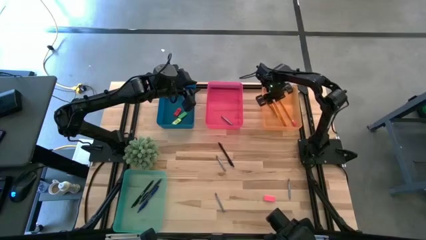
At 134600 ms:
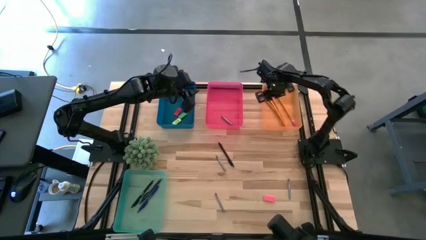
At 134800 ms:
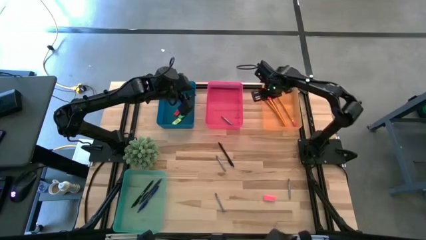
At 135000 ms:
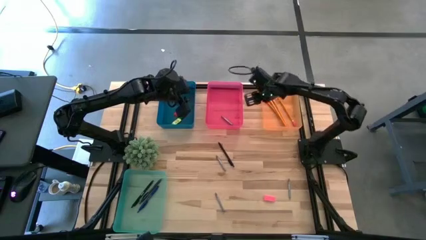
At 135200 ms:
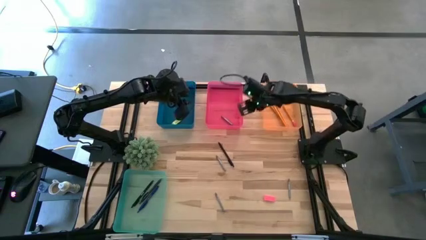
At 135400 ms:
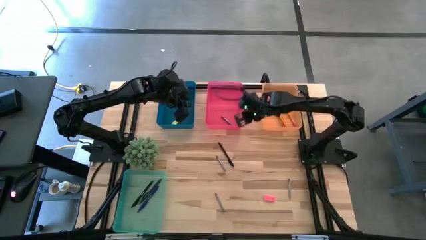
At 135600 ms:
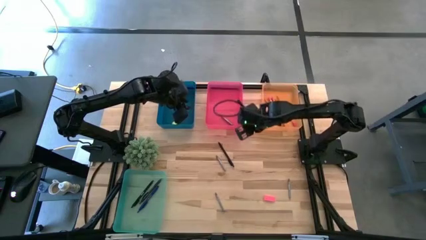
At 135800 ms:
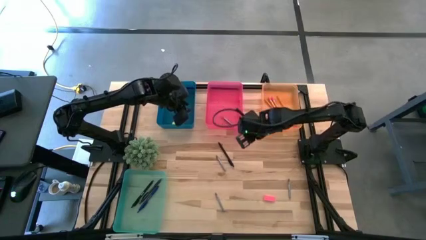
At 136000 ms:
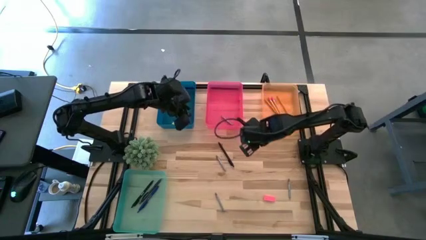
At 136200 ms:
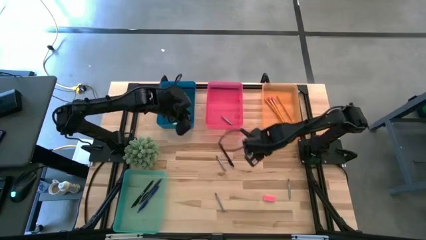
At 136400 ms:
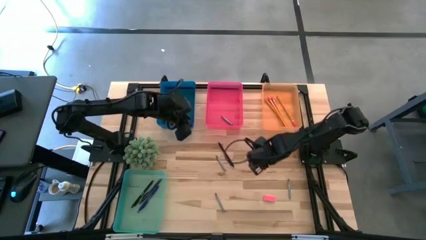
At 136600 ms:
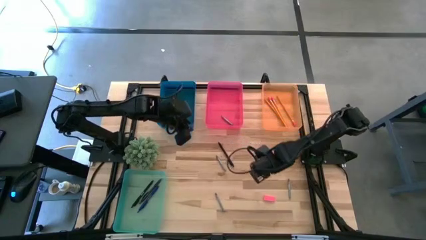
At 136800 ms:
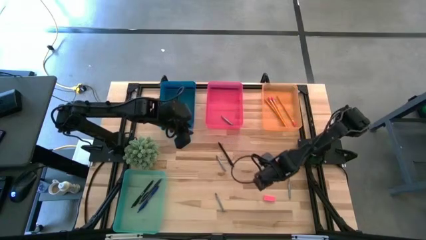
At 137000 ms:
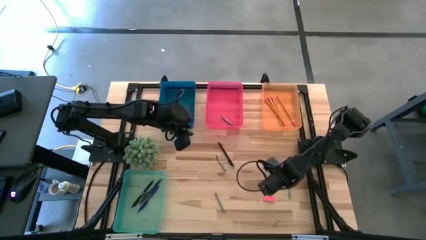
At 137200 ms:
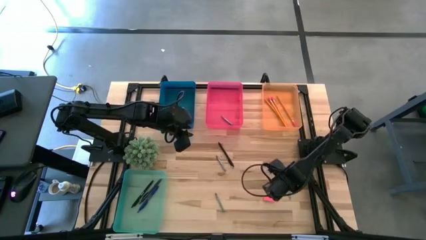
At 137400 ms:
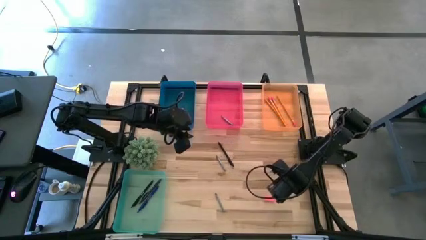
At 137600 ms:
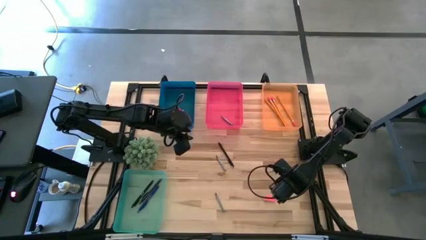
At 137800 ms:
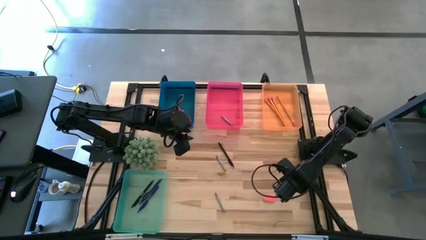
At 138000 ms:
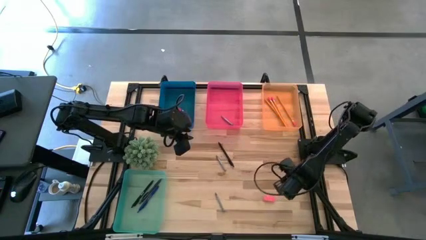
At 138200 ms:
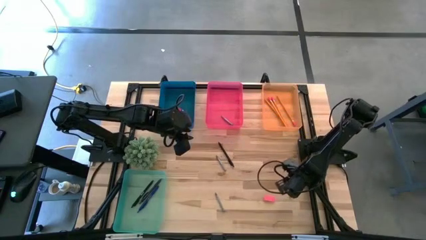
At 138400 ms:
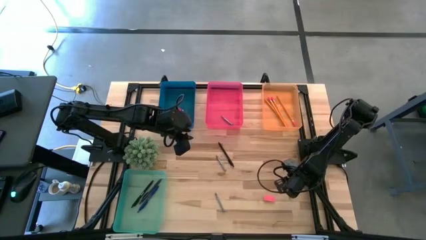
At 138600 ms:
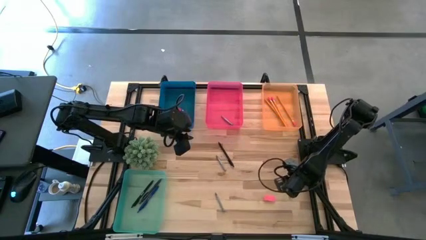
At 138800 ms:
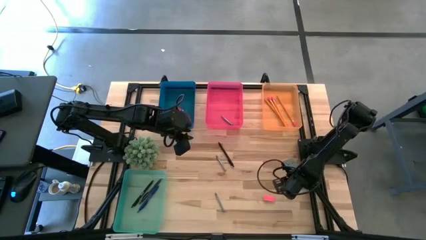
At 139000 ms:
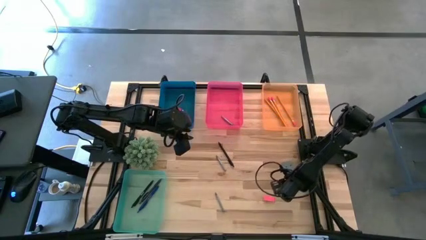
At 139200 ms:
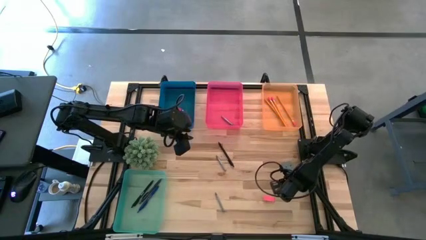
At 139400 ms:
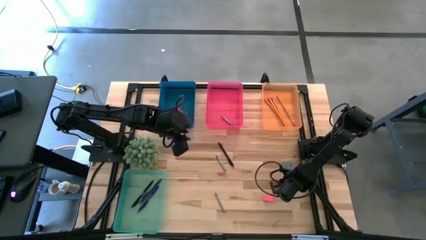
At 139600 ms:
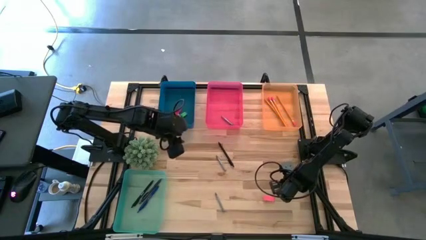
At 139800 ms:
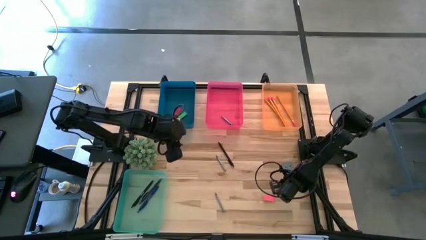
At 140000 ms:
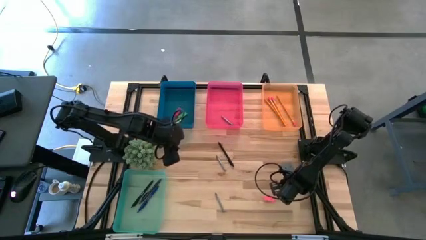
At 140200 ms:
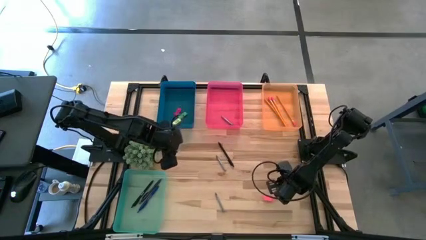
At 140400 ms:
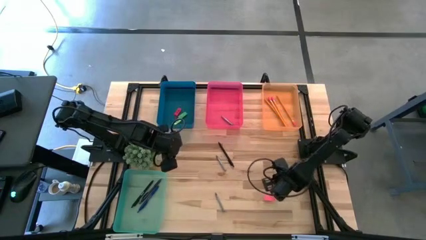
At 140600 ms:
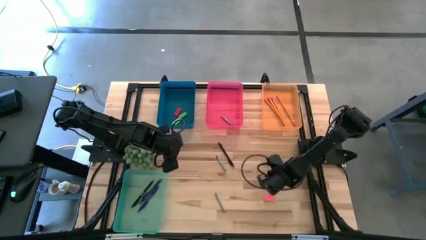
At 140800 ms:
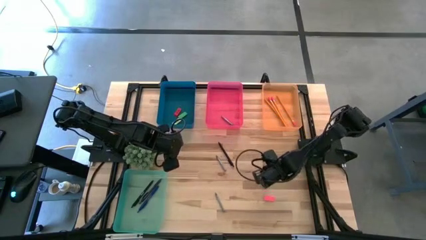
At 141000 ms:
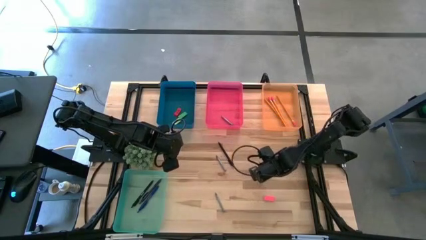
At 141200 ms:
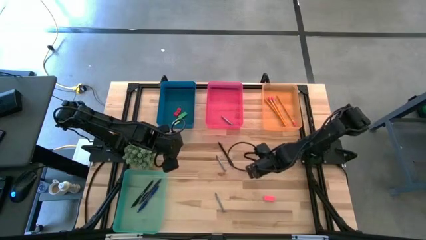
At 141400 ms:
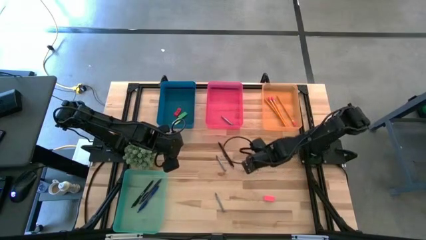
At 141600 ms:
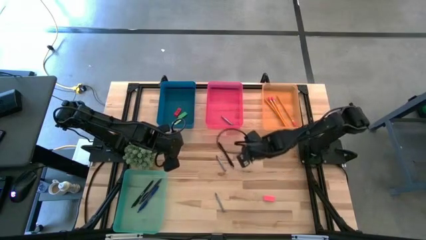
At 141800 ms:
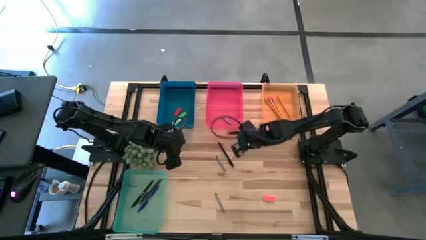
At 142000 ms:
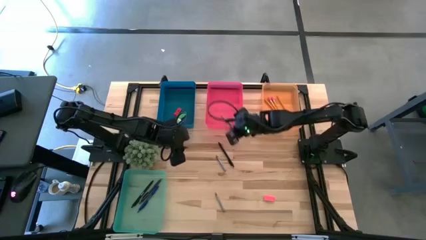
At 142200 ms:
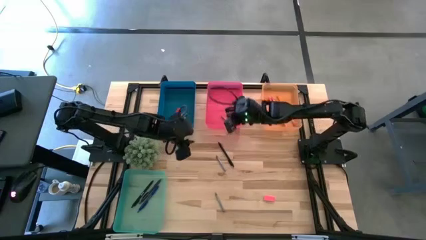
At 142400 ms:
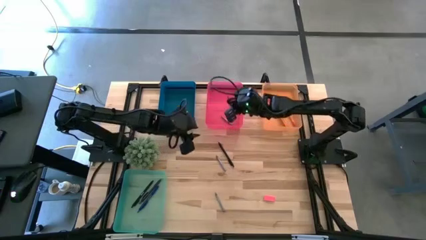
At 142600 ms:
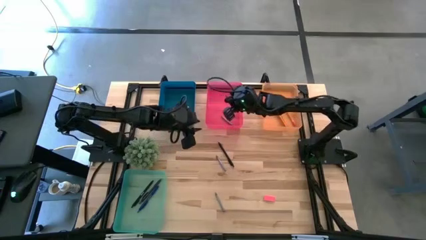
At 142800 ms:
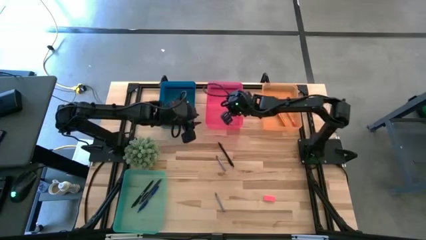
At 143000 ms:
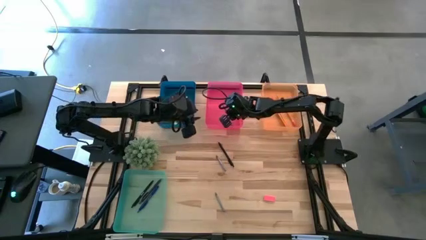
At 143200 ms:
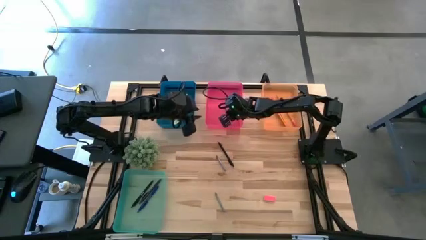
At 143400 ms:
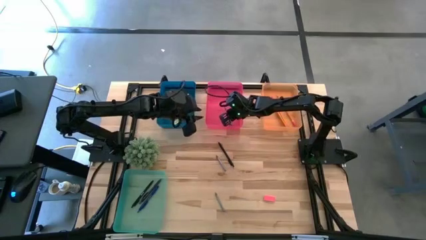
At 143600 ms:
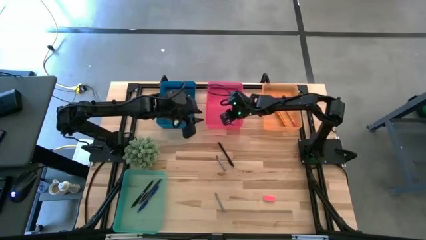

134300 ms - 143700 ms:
Task: Sort crayons/erasers/pens/pencils in bins
Put the middle right gray crayon into the transparent red bin

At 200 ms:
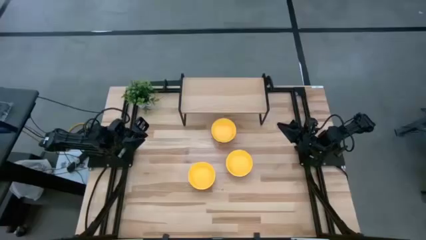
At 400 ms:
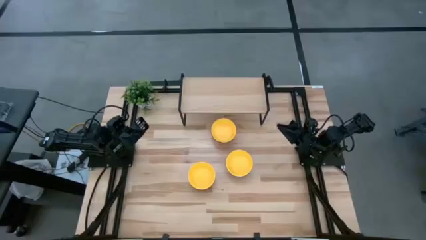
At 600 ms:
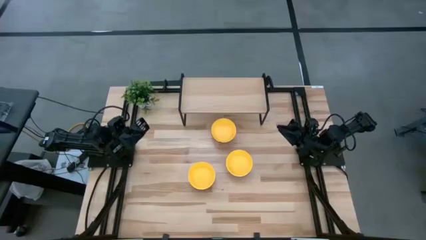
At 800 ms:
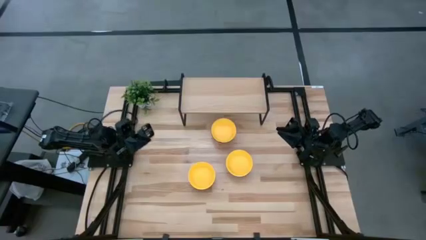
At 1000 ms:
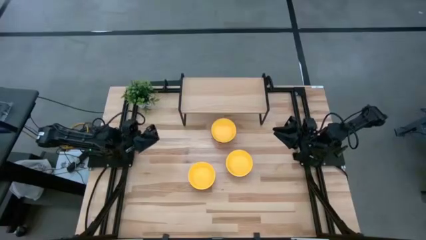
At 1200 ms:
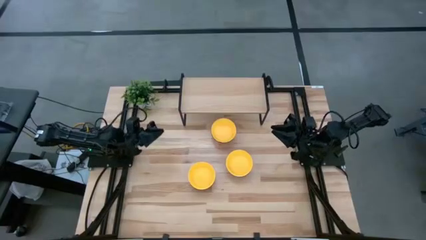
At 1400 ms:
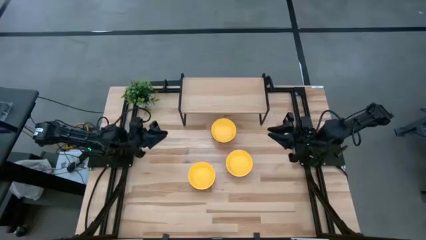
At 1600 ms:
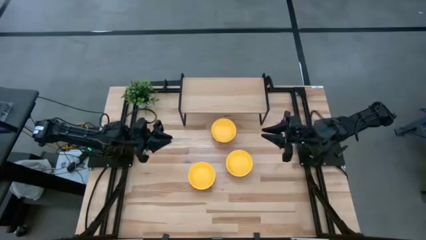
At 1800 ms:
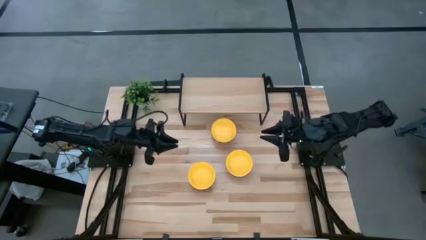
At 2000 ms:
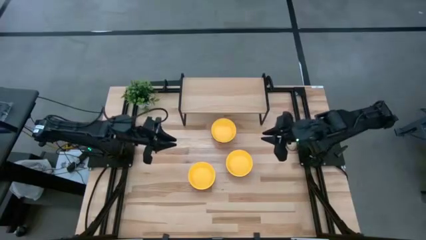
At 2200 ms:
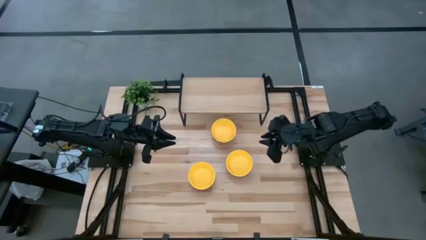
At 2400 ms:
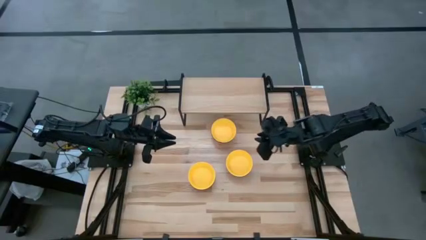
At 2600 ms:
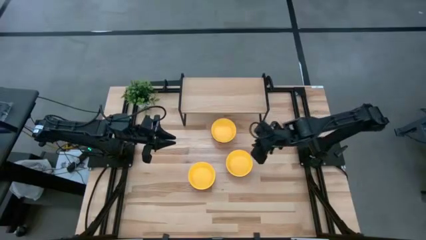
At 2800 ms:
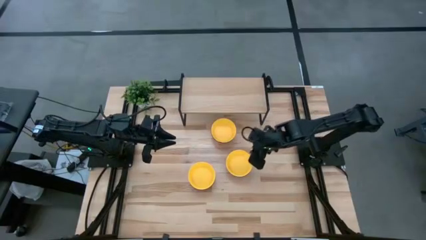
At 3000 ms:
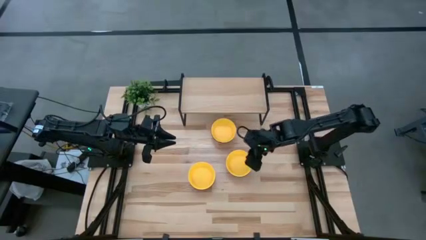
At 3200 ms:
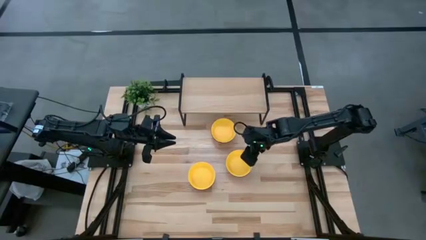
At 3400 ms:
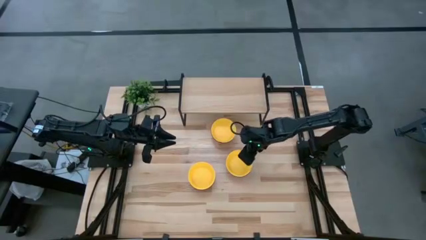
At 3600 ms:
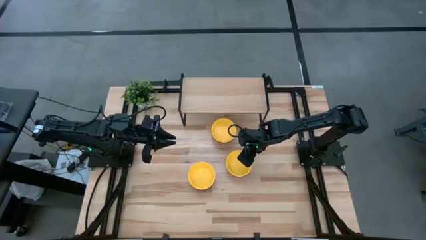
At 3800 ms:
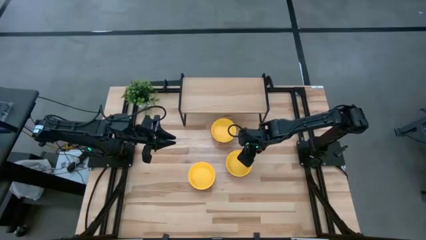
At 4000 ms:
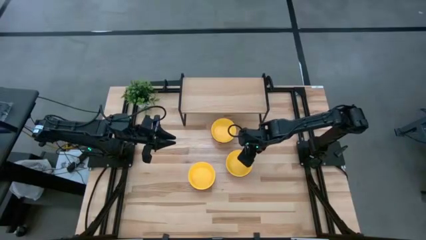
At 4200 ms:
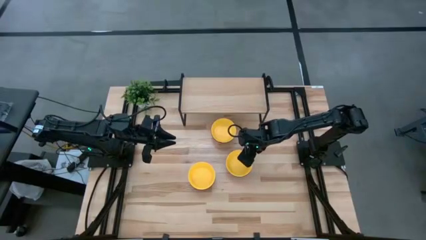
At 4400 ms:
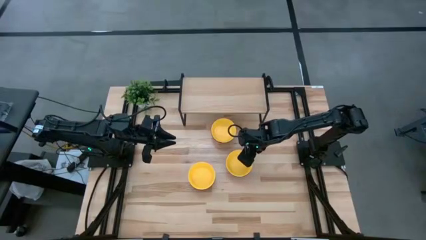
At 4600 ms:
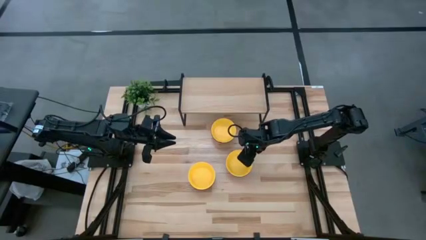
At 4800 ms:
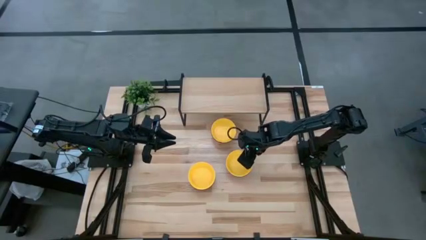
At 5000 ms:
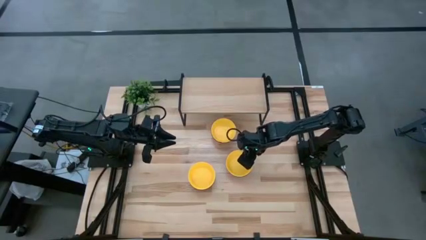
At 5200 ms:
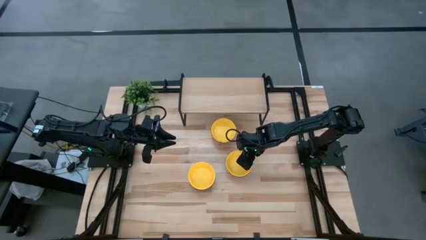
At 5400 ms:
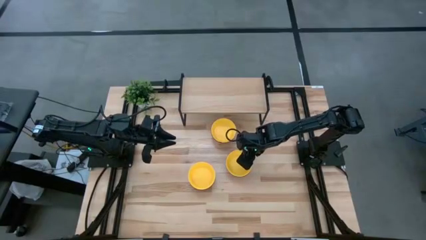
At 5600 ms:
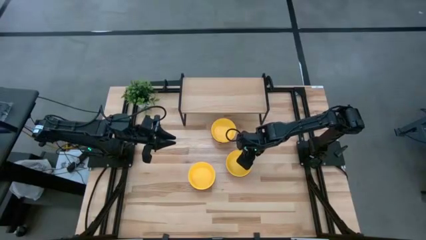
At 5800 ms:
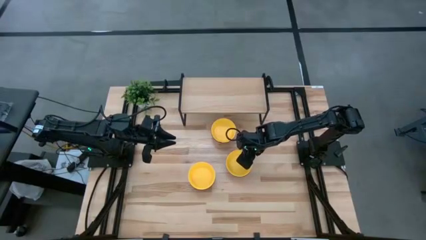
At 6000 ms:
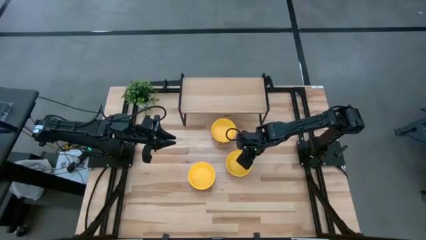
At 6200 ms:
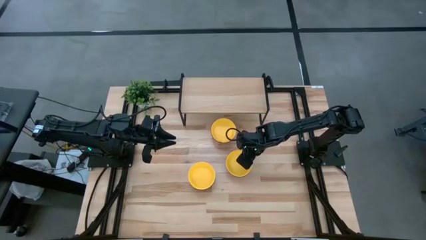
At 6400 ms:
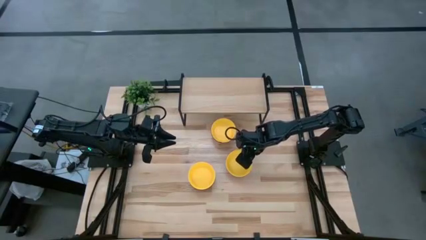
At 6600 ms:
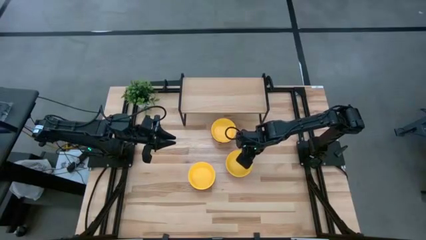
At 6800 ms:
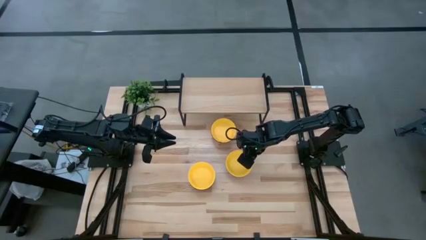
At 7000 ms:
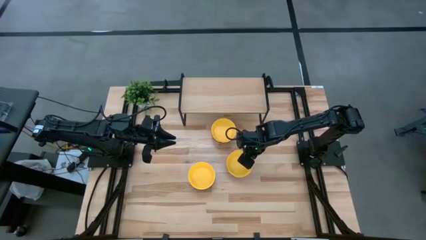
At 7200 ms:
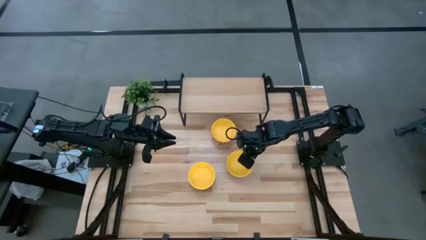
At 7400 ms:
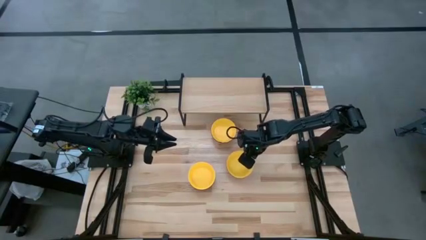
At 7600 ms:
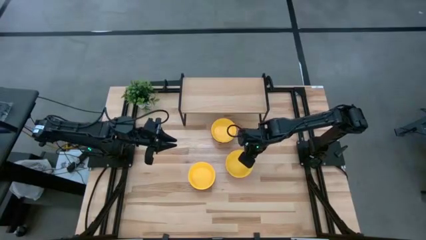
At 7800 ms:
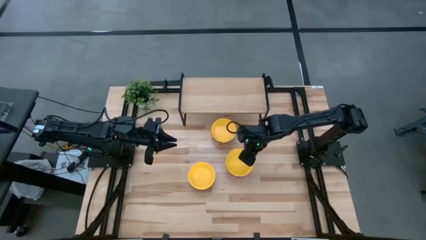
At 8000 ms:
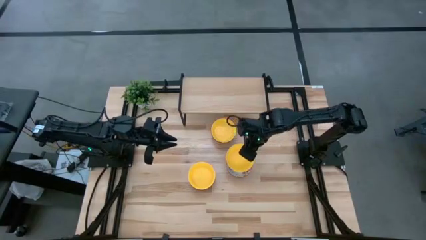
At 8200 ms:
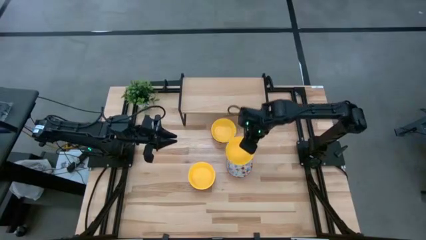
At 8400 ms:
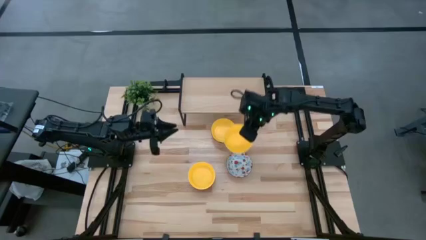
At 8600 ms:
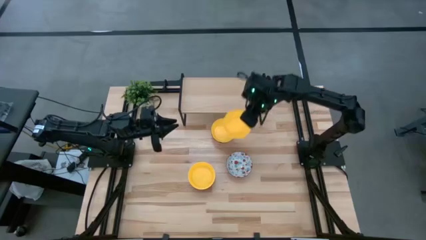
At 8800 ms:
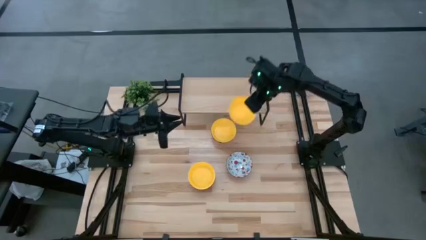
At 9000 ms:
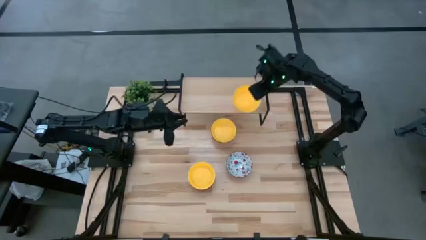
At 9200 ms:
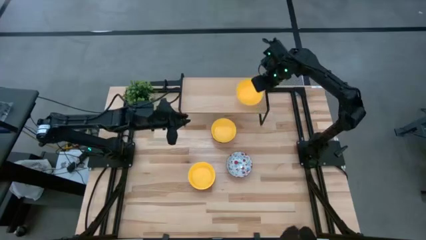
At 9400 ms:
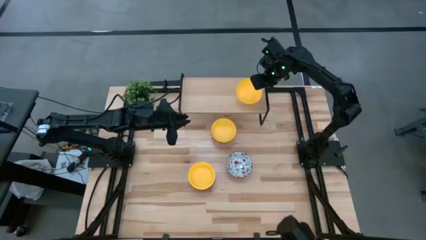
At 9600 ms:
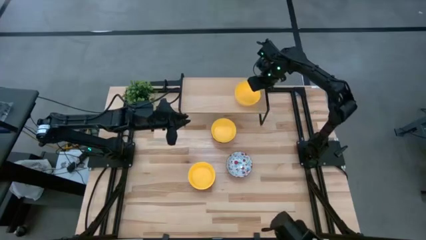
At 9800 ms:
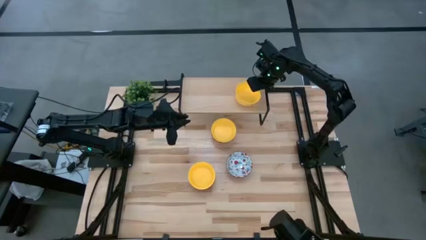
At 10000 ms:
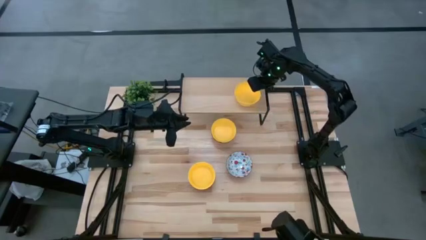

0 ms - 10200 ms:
Task: Pick & Place Mini bowls
Put the middle yellow bowl on the shelf
